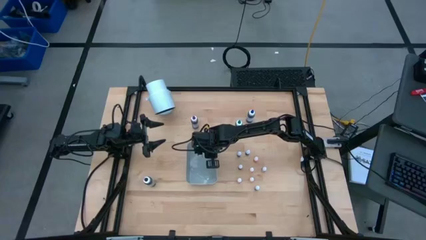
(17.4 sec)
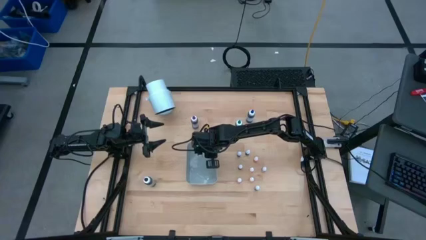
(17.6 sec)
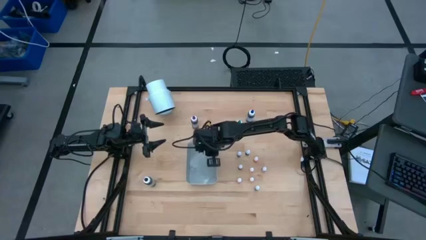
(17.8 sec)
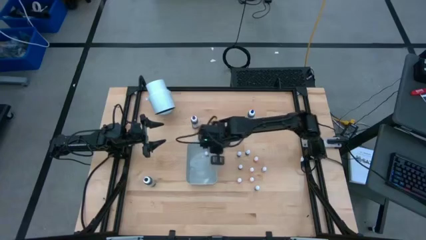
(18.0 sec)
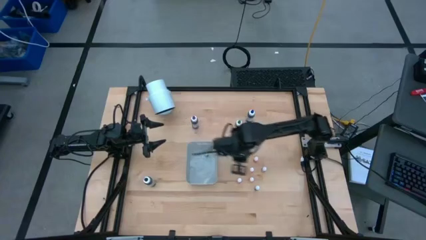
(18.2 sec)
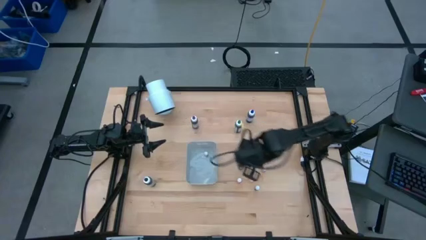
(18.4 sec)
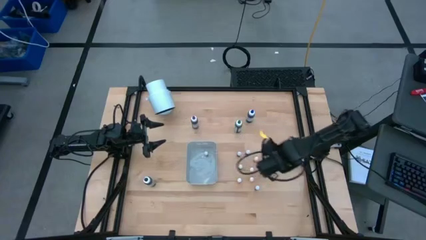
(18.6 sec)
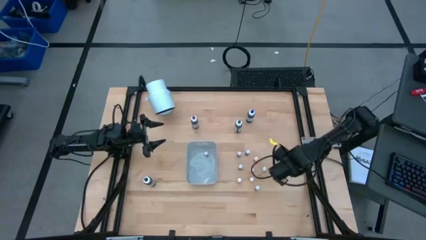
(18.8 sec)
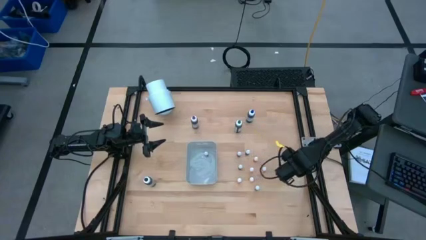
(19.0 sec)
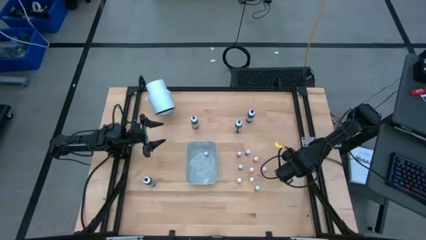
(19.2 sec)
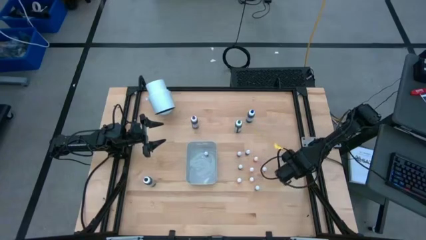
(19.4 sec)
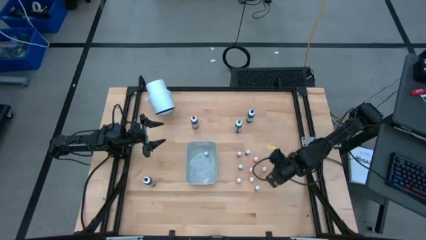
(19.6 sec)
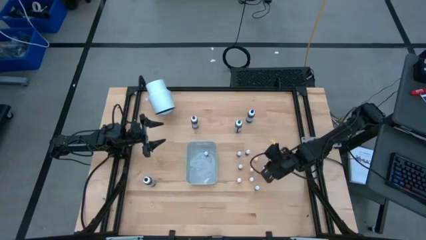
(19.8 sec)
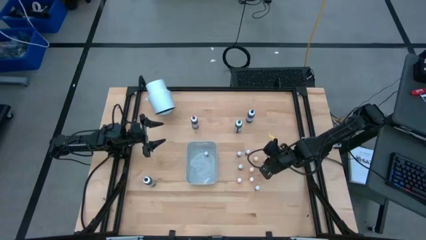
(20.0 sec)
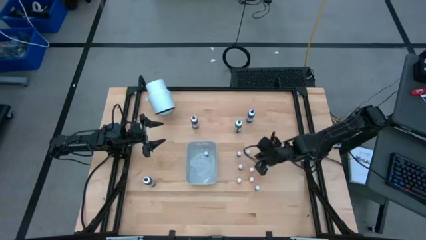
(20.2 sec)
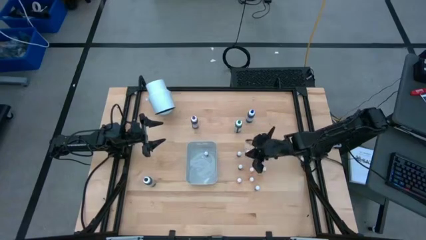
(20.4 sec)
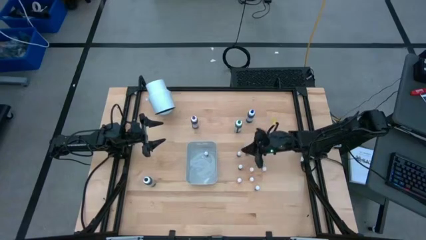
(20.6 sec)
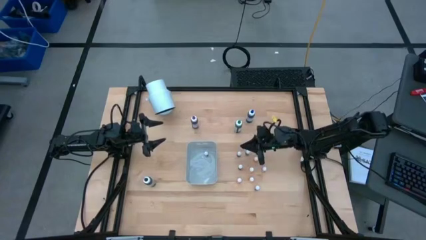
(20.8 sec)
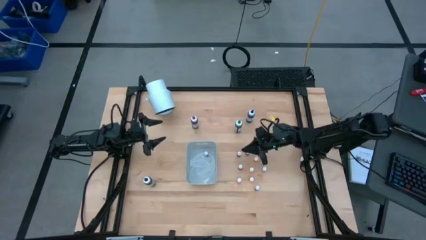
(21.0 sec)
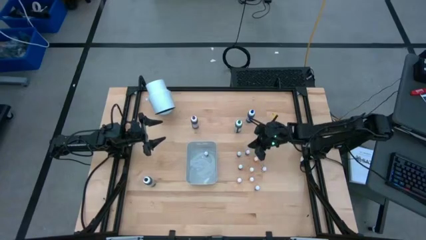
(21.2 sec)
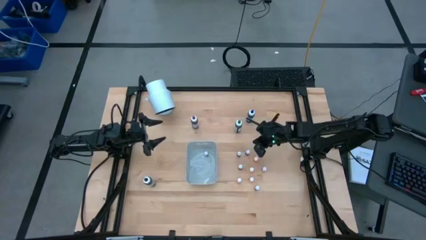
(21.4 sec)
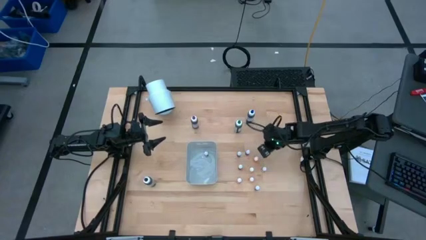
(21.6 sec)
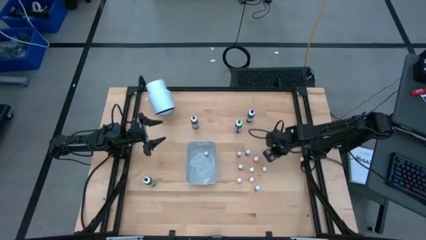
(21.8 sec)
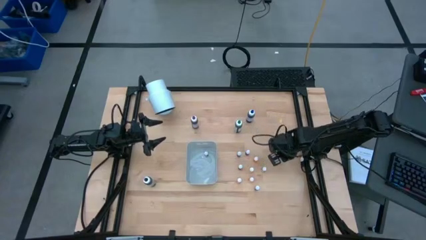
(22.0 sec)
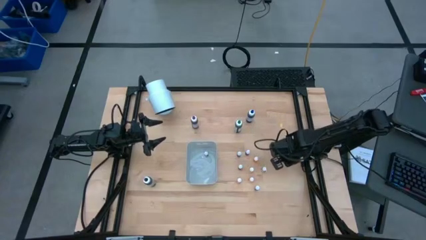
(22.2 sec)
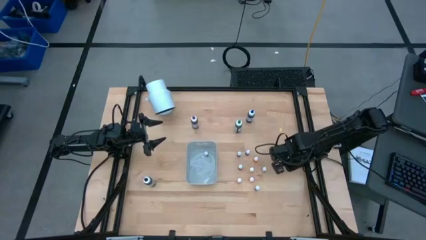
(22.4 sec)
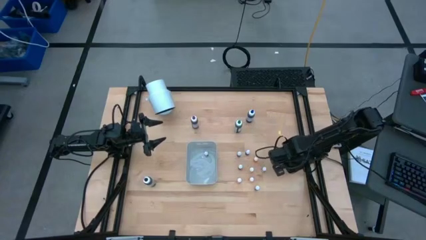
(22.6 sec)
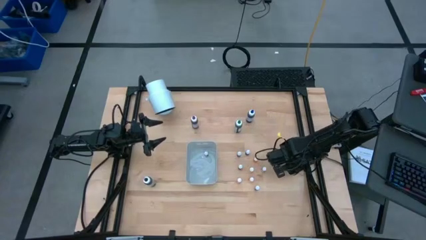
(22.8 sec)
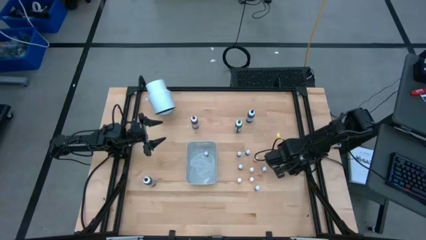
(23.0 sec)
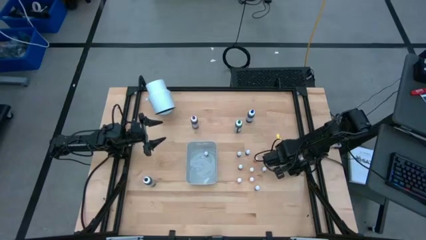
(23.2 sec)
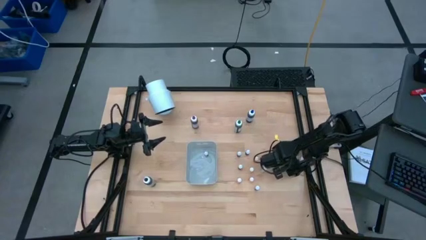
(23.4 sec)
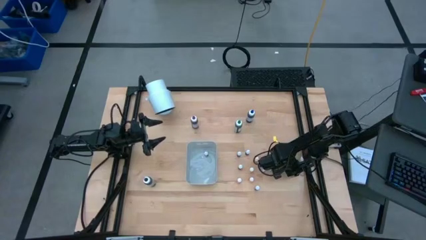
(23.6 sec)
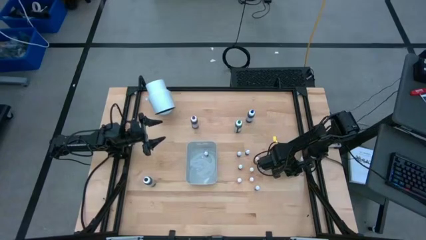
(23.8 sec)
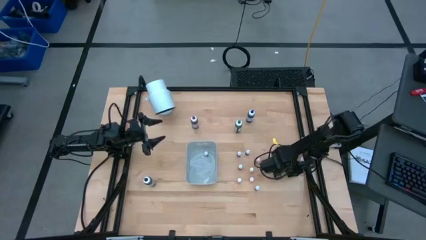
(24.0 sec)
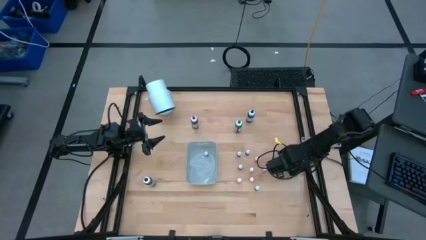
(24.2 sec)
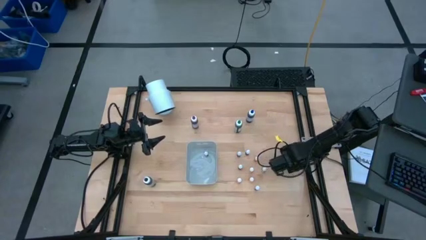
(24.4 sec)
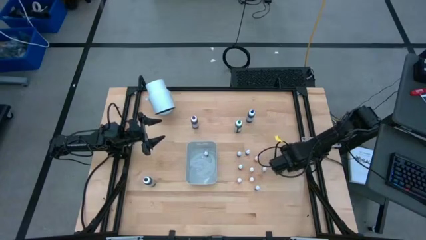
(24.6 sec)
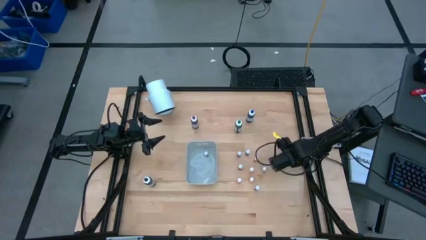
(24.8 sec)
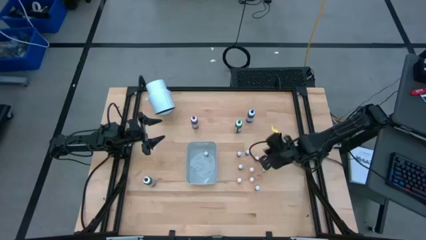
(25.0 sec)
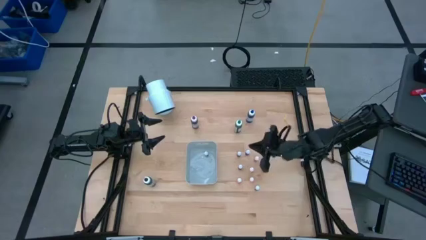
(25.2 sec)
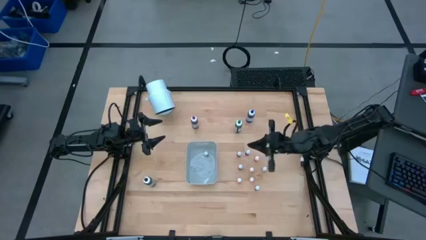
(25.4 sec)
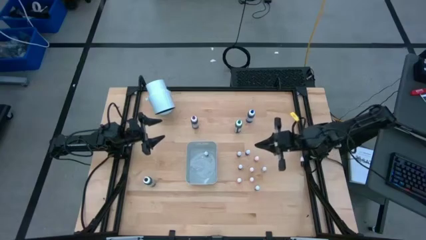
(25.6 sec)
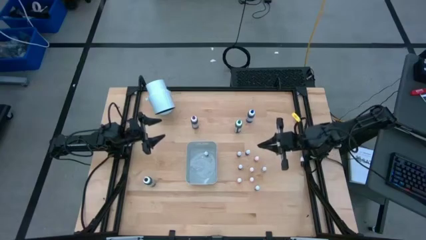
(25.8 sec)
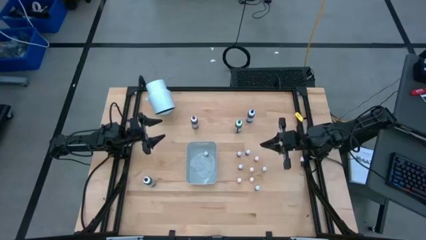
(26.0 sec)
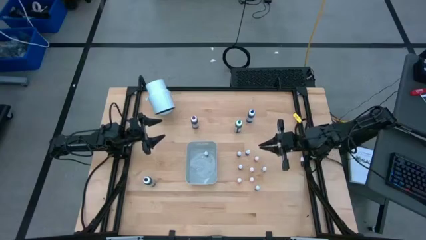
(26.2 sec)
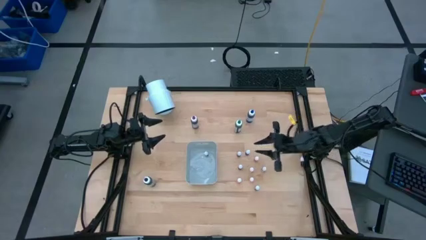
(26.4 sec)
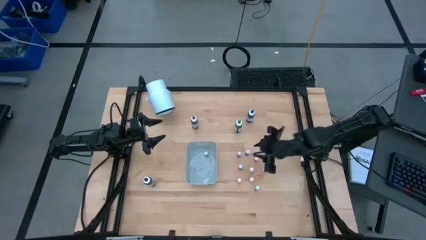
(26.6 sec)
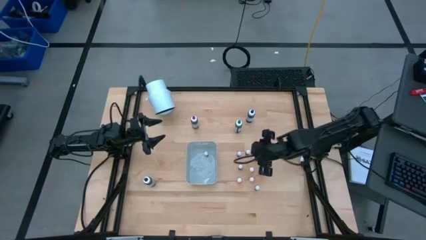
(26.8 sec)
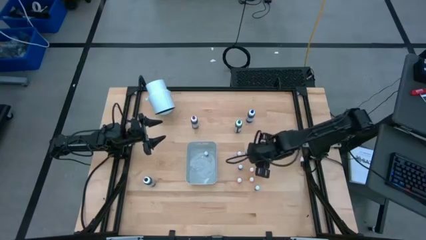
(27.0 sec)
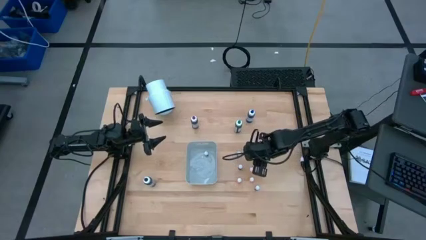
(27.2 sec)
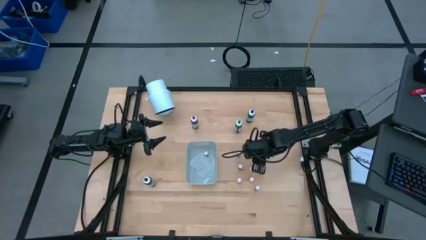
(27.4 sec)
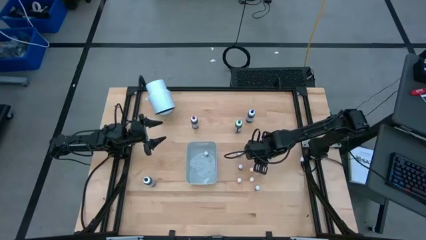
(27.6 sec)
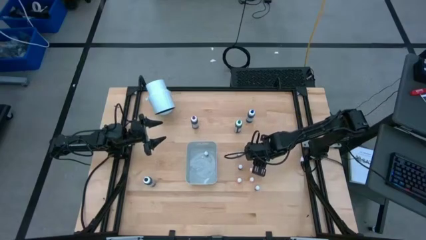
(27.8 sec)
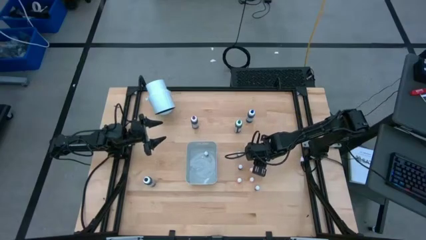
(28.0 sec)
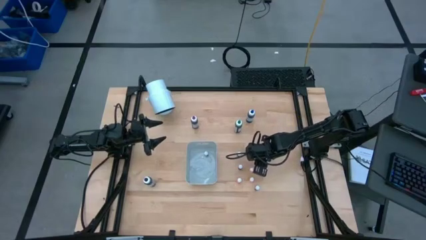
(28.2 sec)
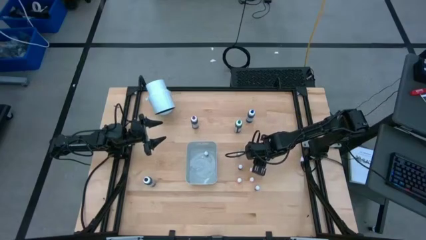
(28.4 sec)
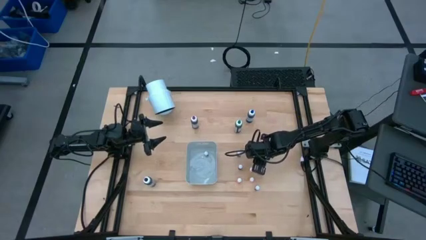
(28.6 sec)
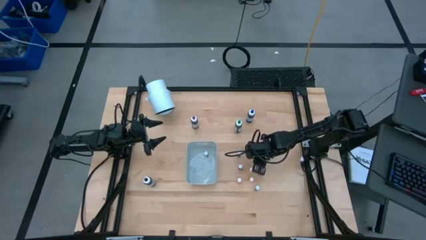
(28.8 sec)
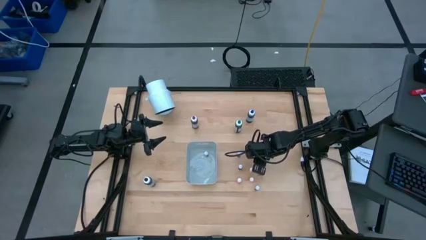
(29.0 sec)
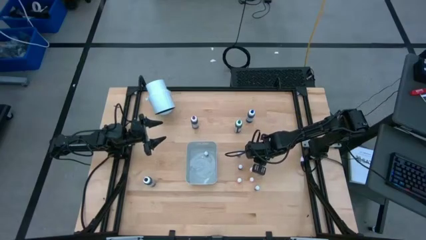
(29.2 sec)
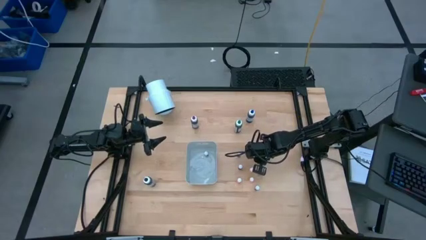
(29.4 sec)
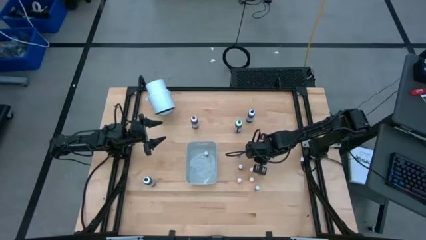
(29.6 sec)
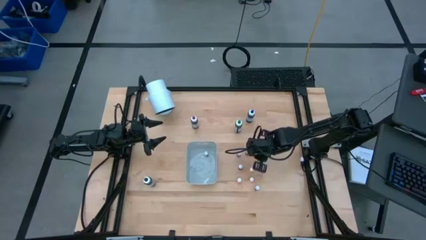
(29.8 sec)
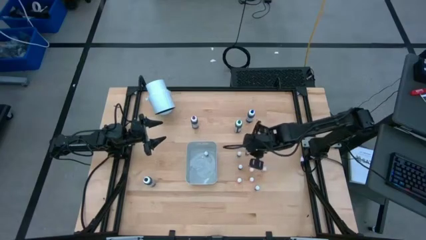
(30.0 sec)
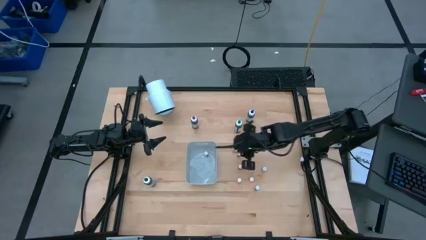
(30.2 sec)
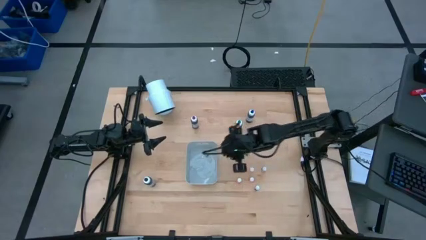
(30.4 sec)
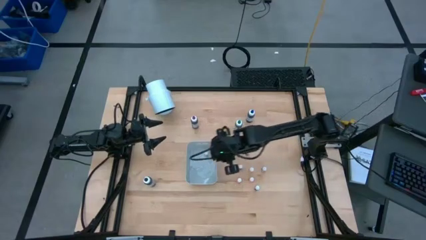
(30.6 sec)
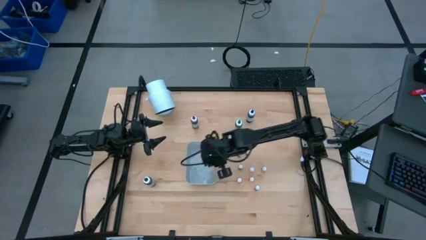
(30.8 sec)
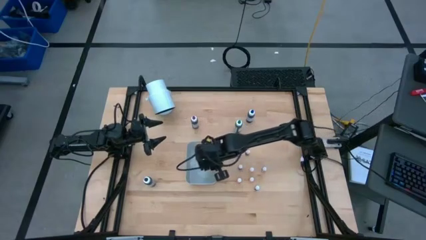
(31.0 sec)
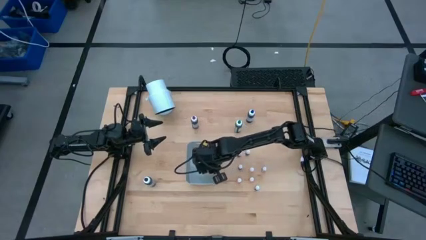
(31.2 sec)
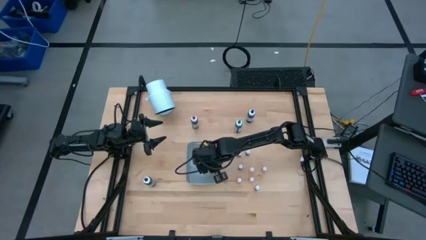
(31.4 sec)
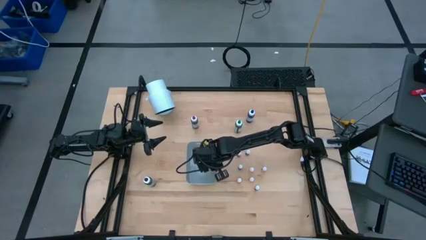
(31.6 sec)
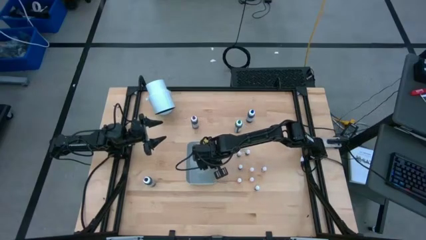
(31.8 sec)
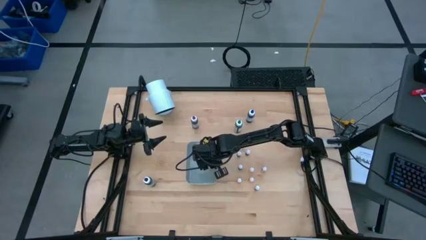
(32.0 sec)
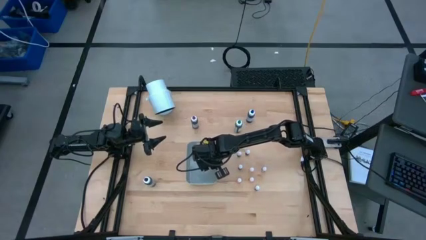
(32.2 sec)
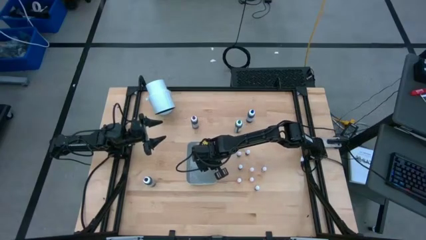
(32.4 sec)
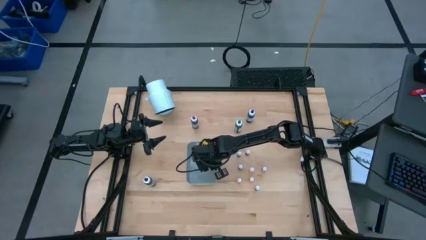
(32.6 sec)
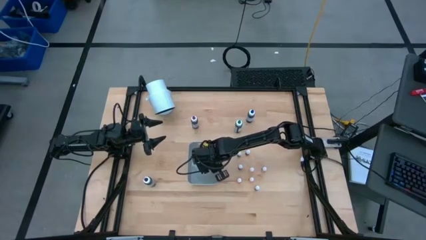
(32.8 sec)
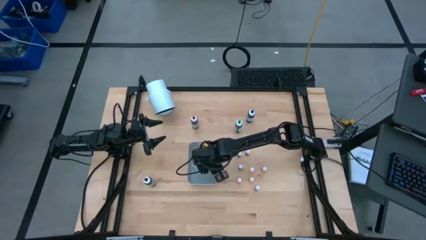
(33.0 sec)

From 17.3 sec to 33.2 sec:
Task: Pick & Place food coloring
Put the yellow food coloring bottle into the bin
